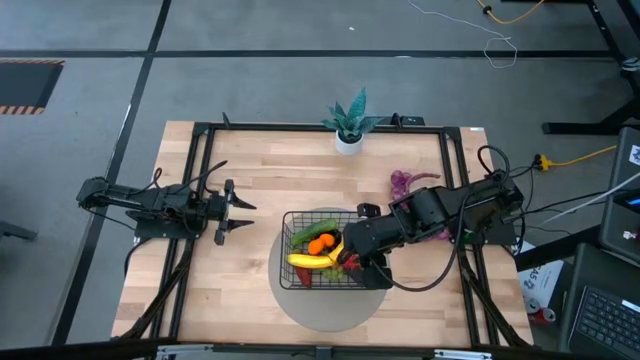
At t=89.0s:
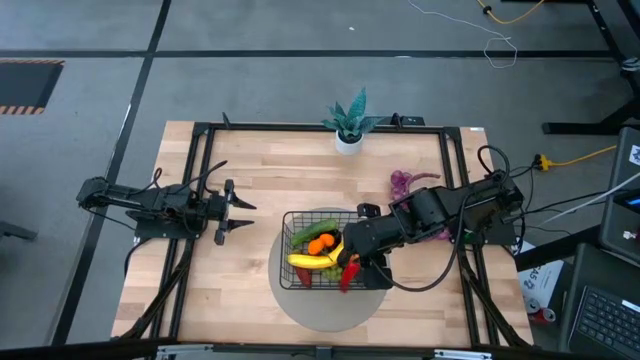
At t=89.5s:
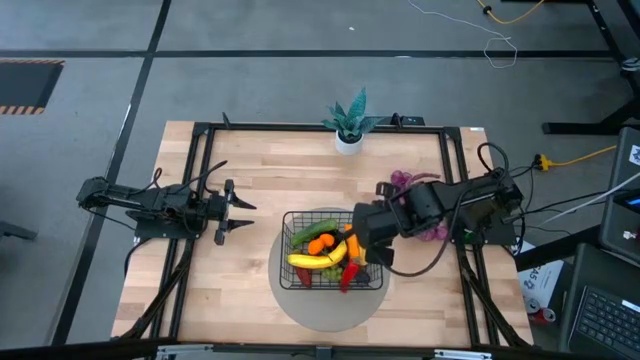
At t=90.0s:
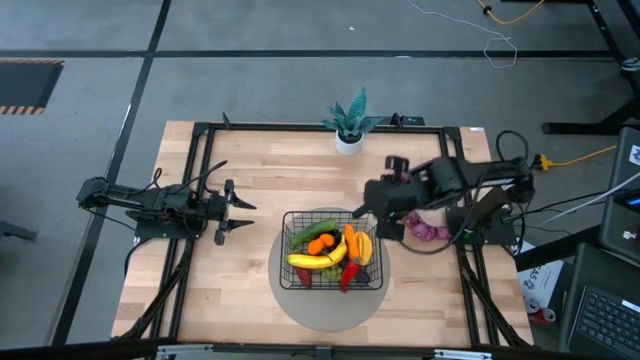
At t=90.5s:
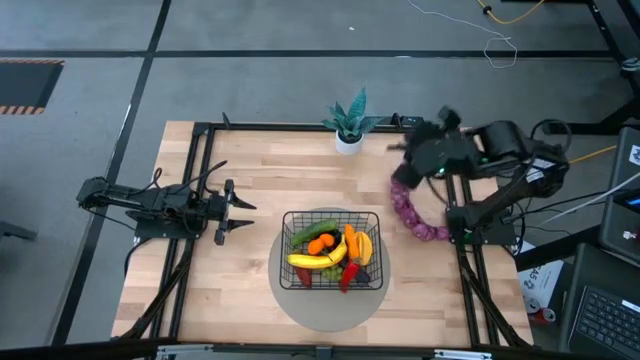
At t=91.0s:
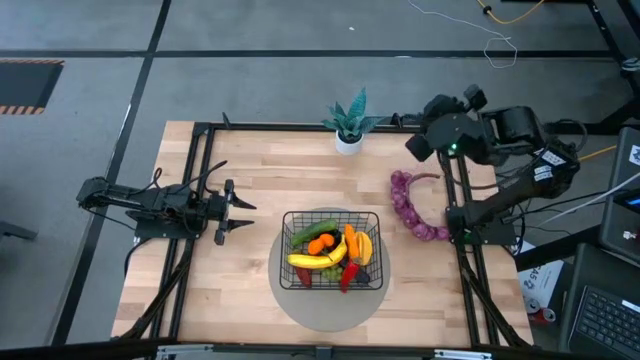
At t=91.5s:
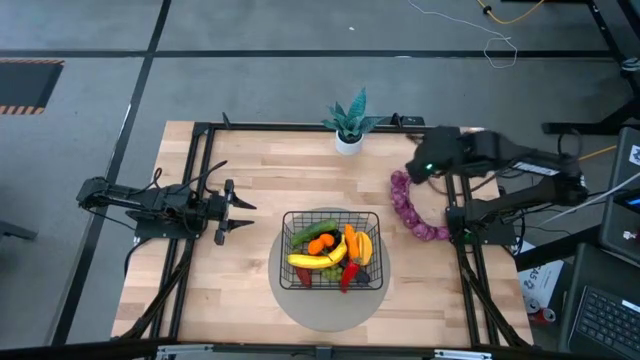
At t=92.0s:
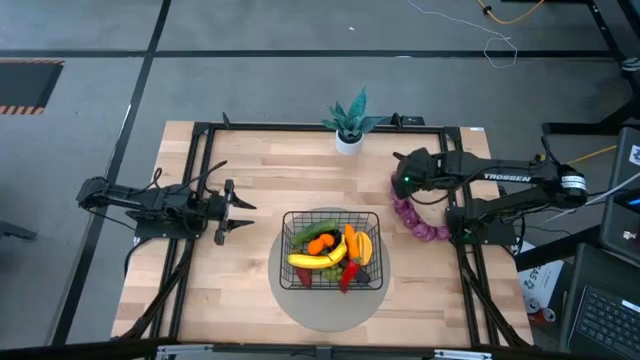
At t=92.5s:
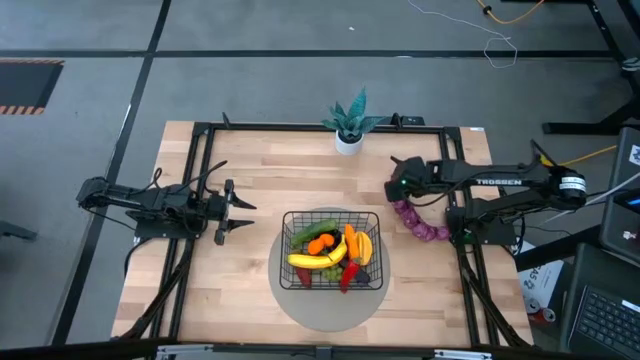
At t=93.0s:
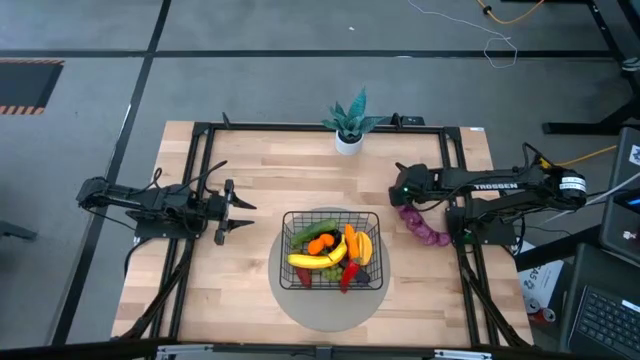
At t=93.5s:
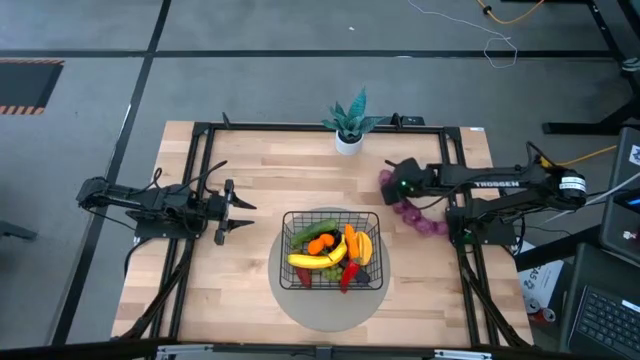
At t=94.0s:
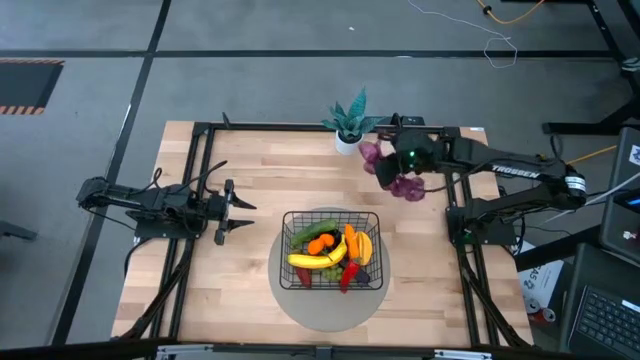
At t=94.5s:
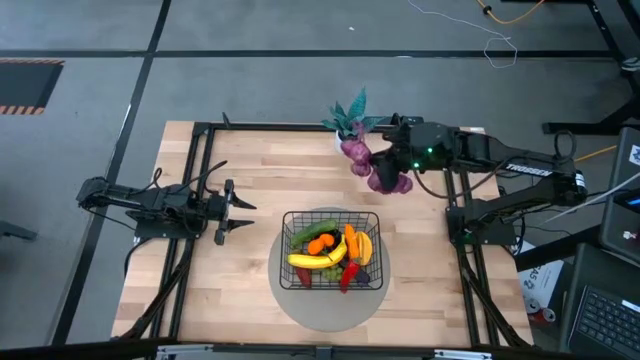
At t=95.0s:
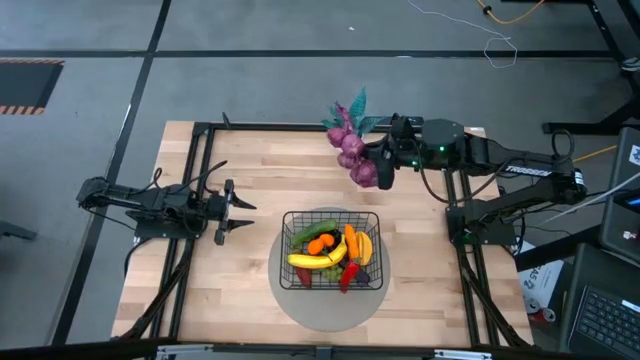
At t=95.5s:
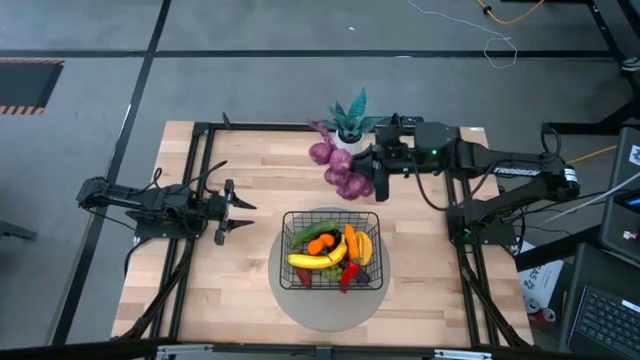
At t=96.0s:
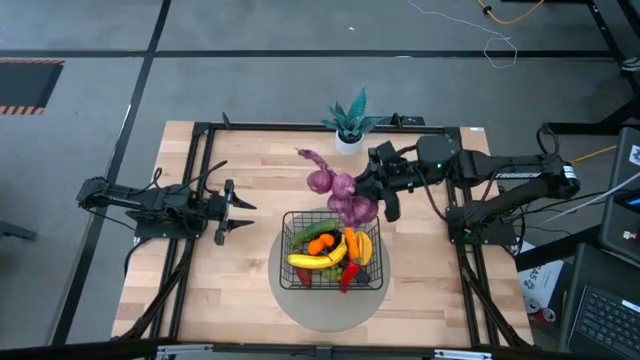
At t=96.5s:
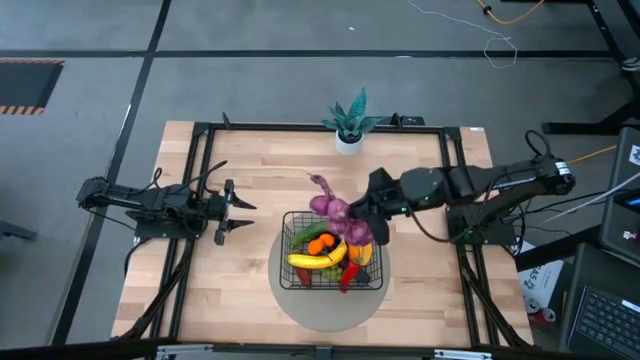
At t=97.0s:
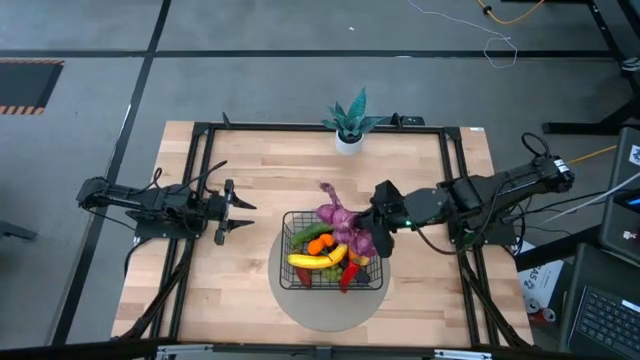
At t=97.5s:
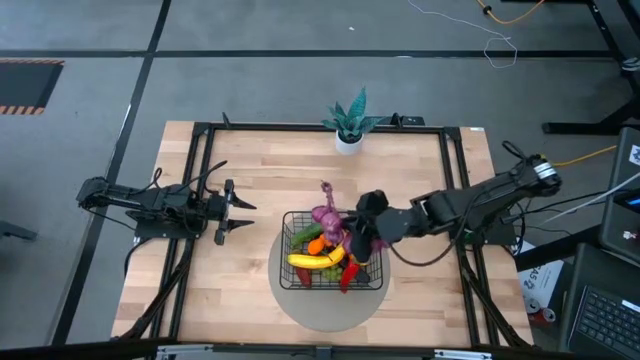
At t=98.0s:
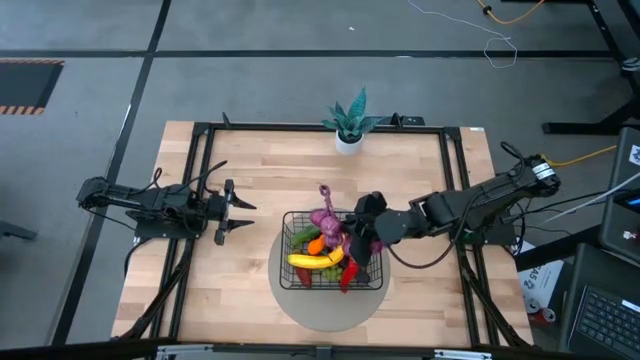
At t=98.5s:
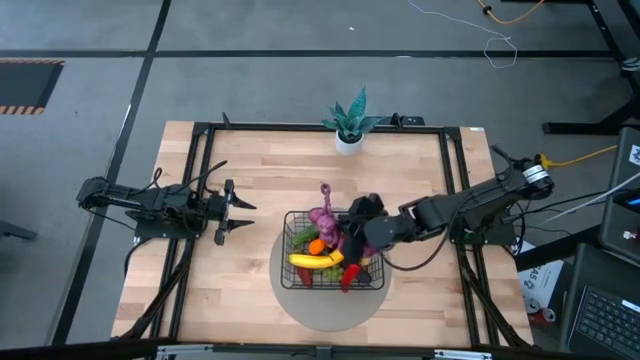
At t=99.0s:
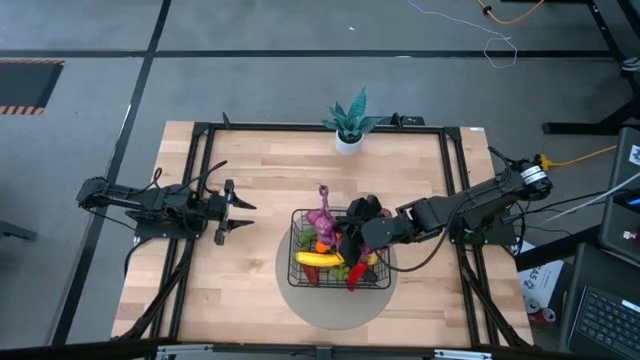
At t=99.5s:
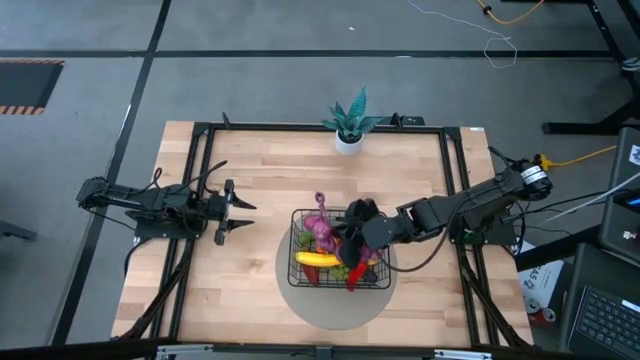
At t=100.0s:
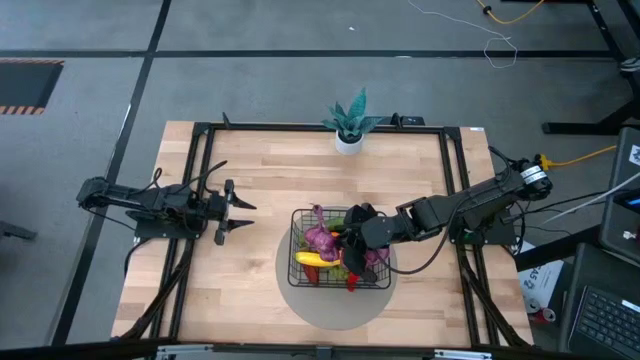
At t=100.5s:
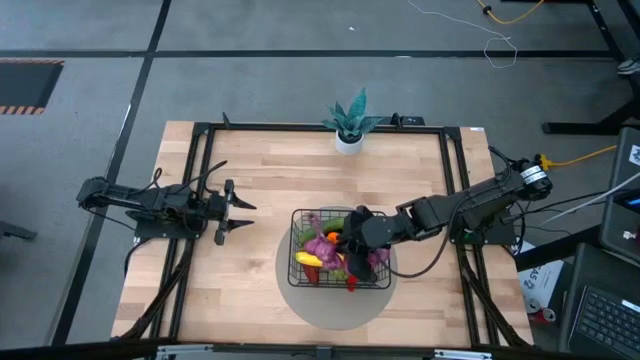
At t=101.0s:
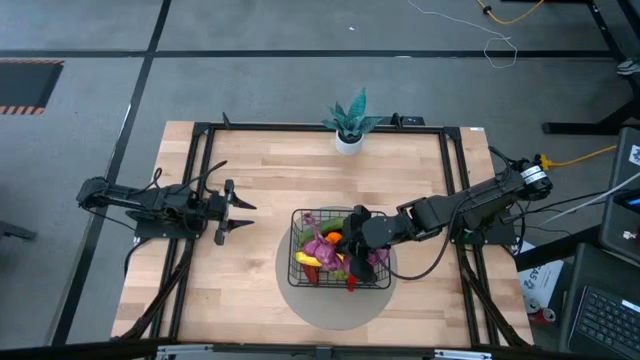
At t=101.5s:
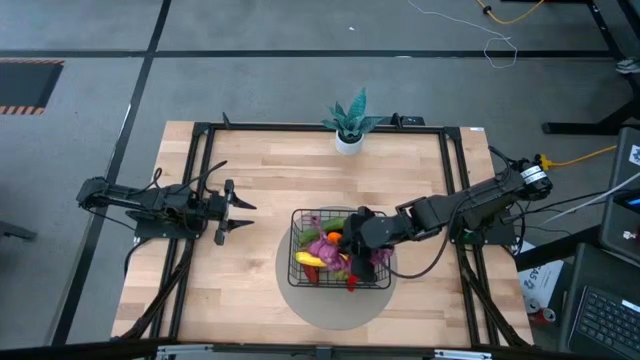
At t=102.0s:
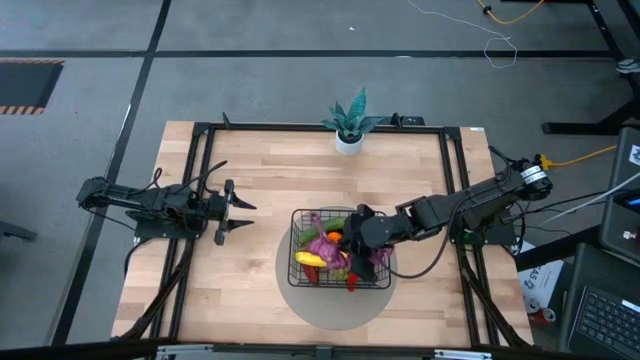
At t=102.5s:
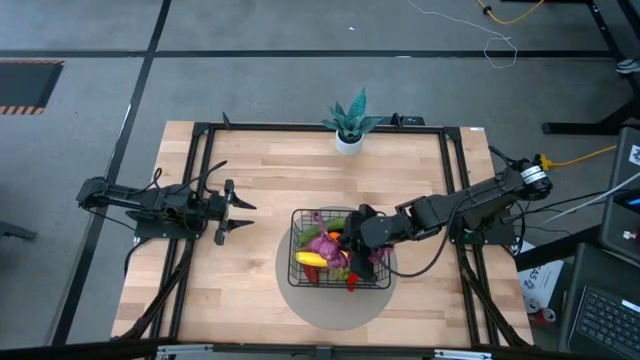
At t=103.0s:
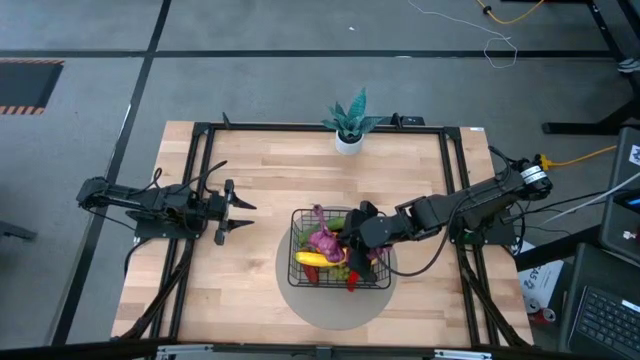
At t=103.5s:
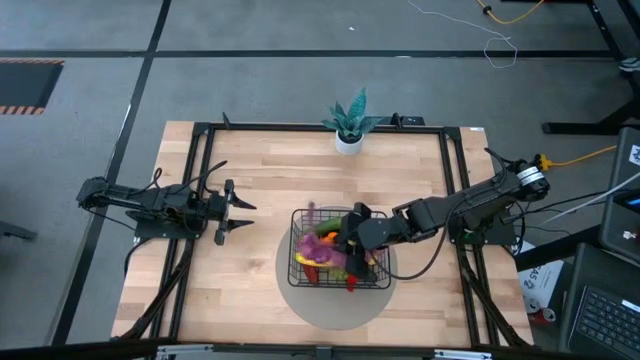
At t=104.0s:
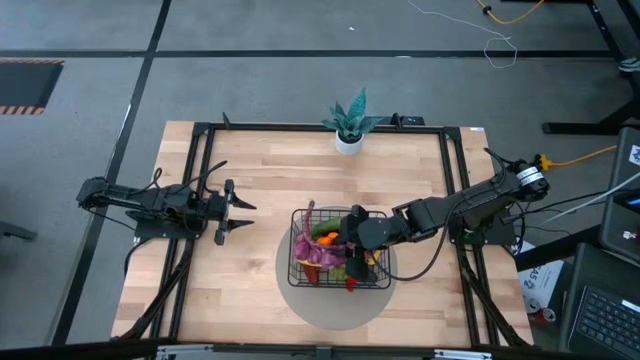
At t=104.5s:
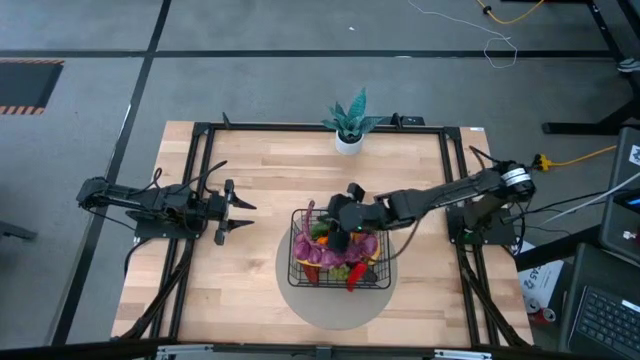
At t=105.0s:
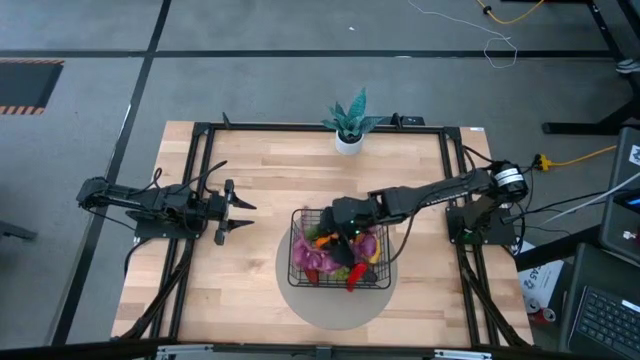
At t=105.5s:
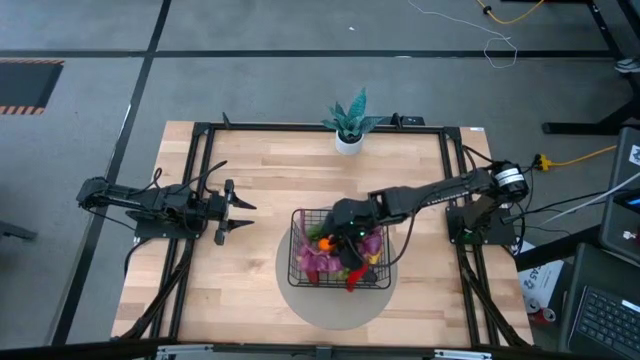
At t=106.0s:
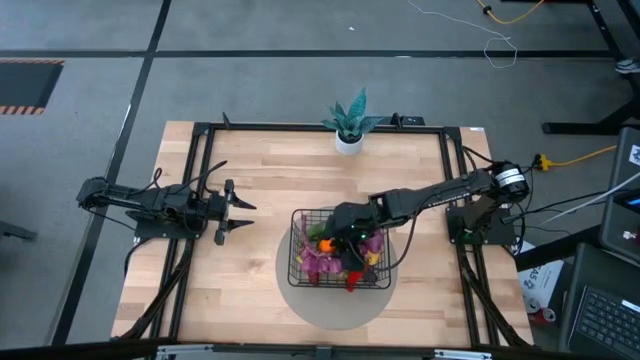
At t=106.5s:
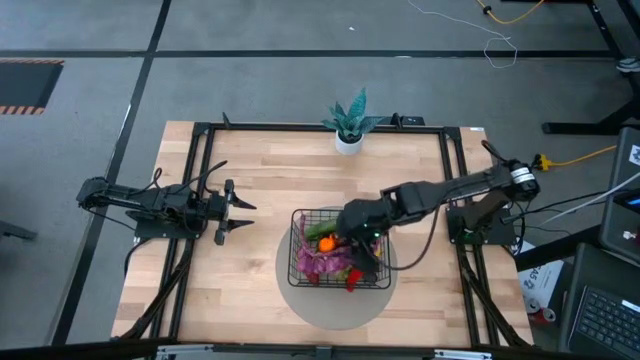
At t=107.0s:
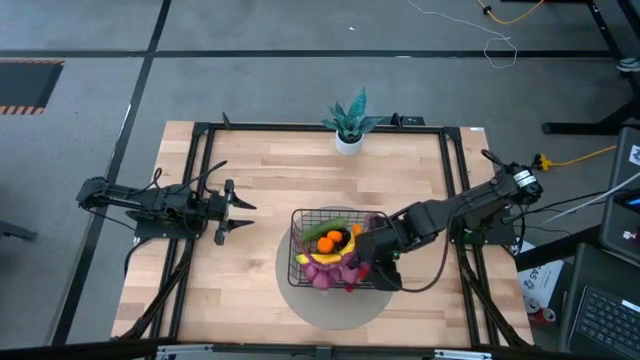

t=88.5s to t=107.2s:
Task: Build produce basket
Put the purple garlic into the black wire basket

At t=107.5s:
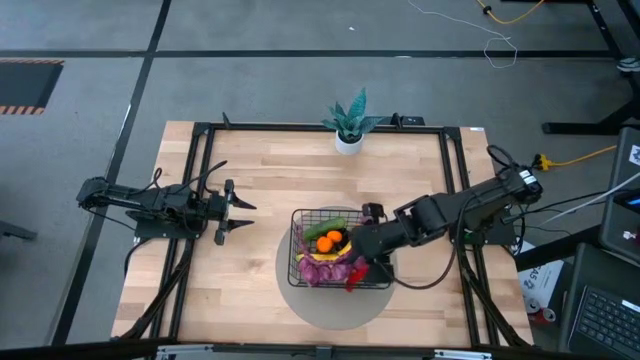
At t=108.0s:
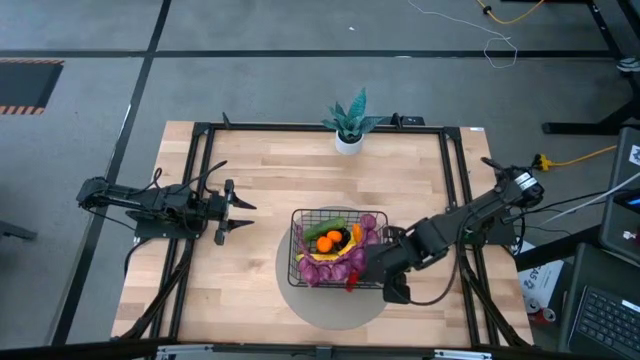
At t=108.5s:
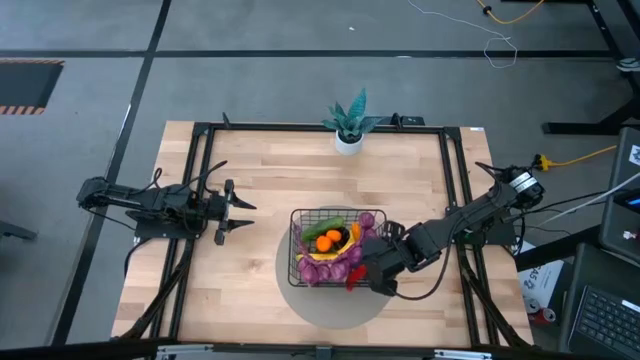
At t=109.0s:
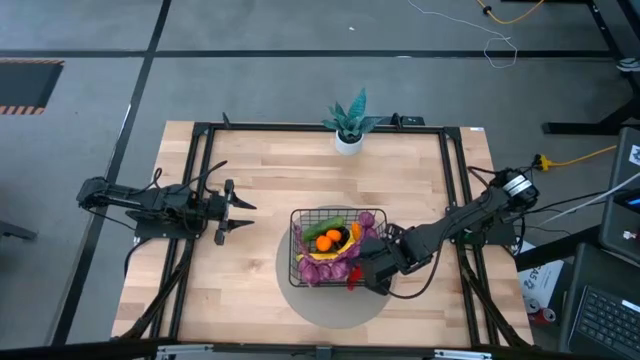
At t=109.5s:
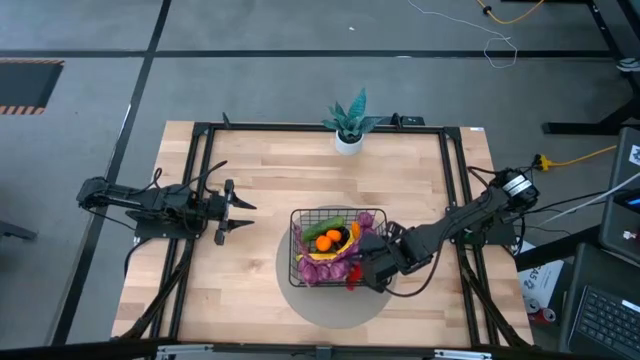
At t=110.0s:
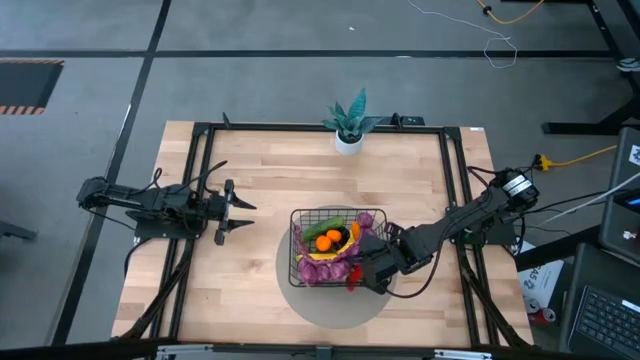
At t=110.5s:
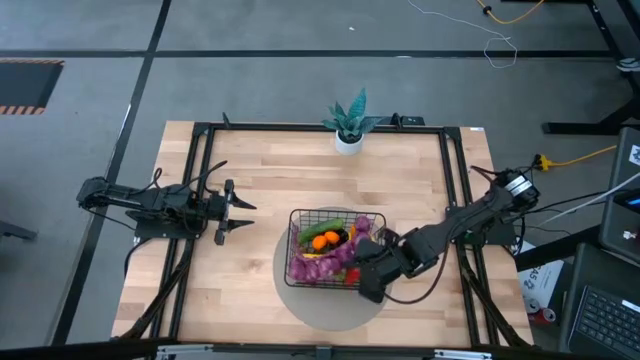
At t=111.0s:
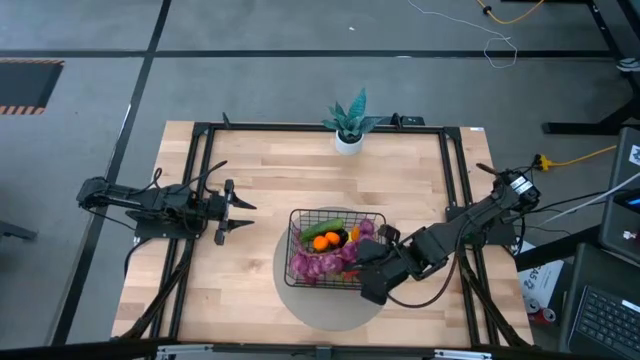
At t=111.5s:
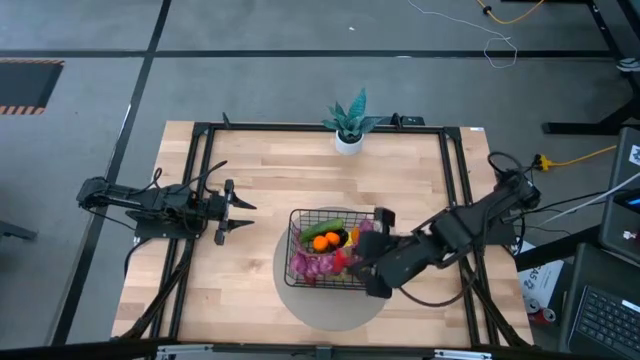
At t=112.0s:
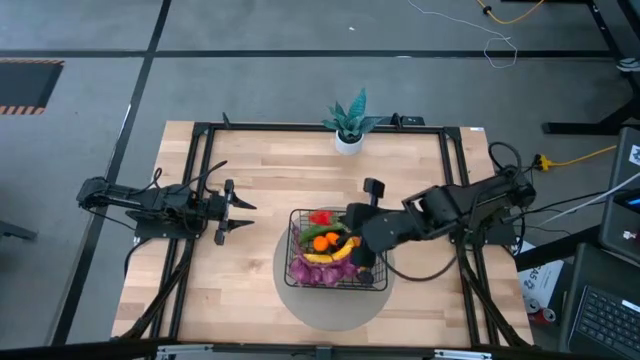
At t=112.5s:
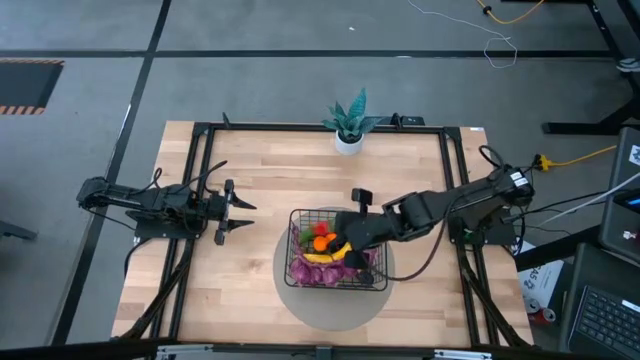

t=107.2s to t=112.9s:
Adjust the red chili pepper in the black wire basket
